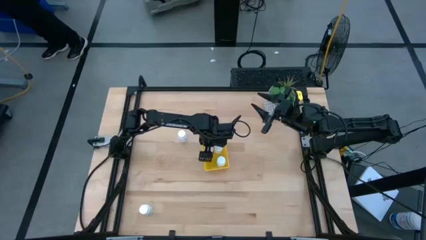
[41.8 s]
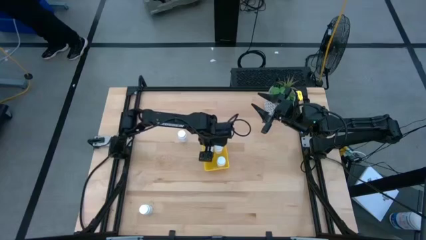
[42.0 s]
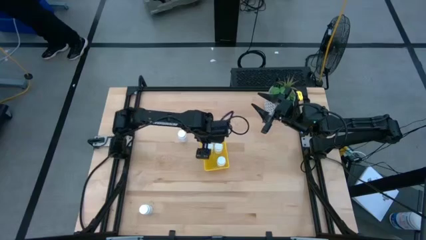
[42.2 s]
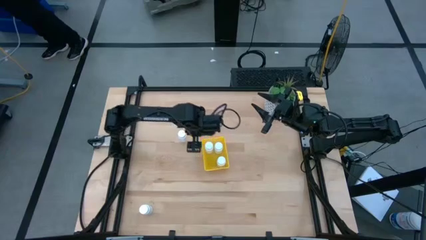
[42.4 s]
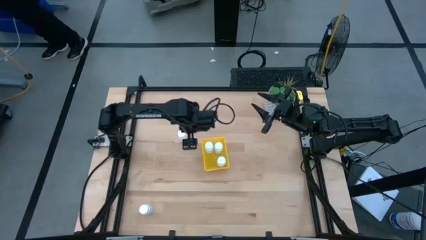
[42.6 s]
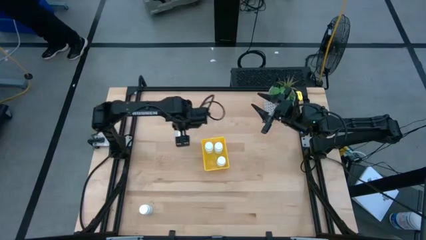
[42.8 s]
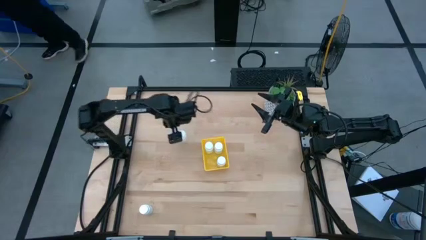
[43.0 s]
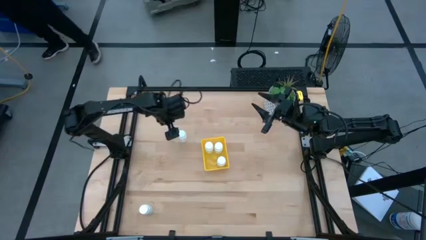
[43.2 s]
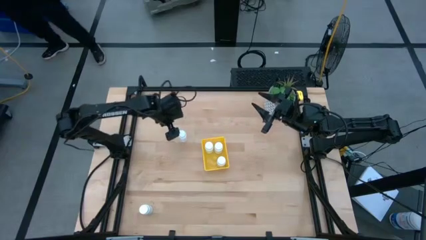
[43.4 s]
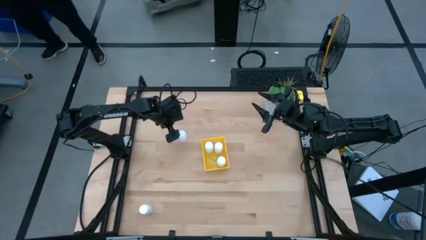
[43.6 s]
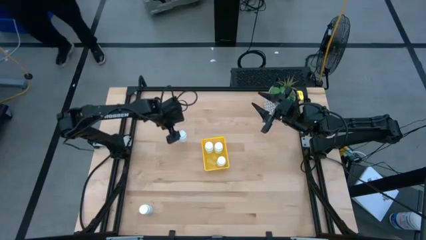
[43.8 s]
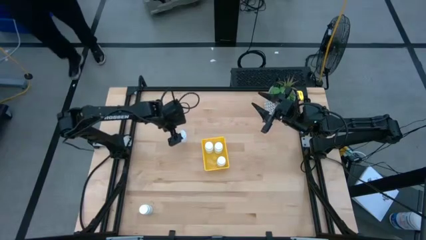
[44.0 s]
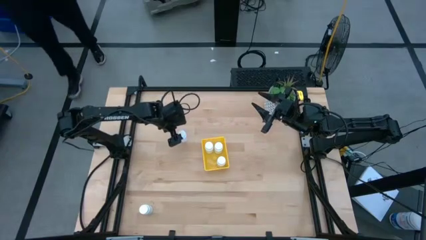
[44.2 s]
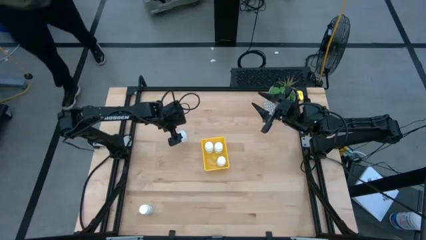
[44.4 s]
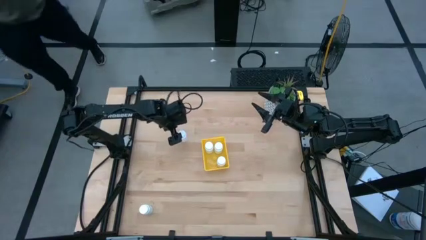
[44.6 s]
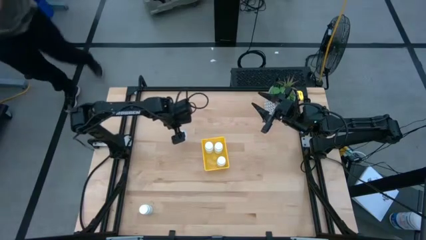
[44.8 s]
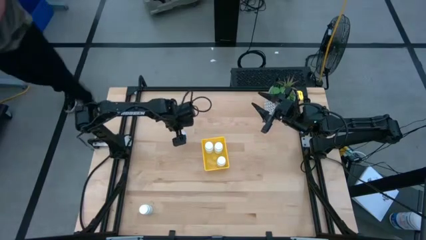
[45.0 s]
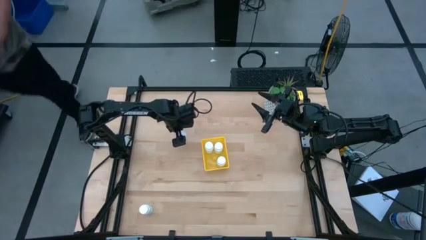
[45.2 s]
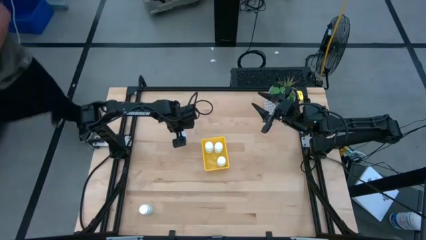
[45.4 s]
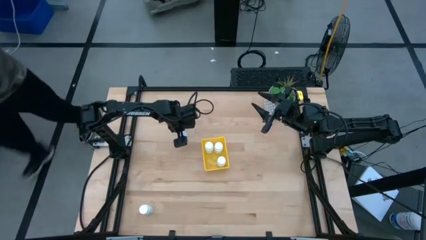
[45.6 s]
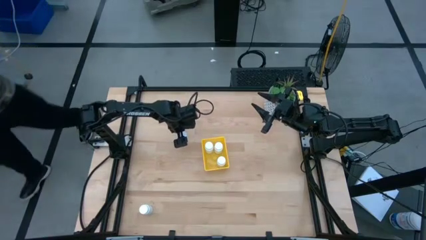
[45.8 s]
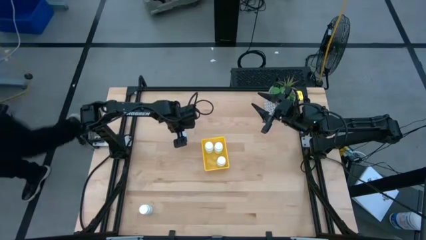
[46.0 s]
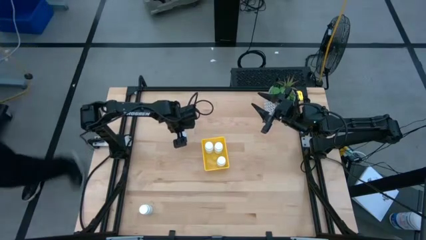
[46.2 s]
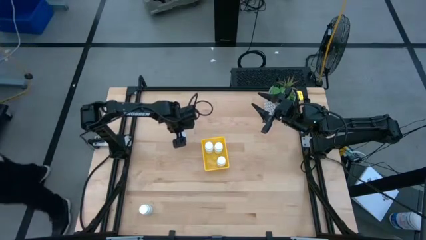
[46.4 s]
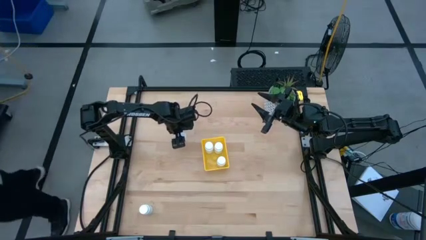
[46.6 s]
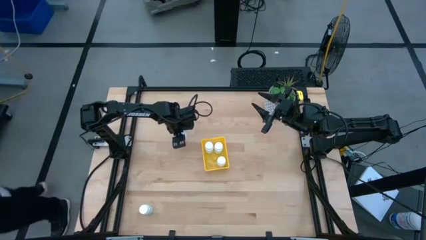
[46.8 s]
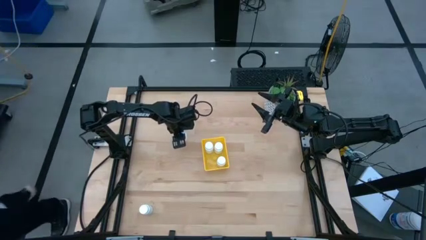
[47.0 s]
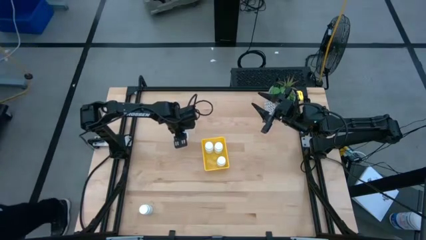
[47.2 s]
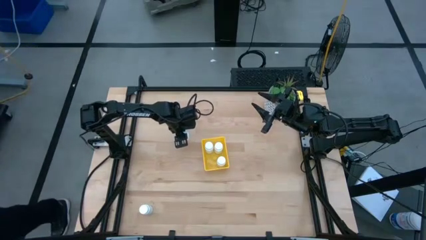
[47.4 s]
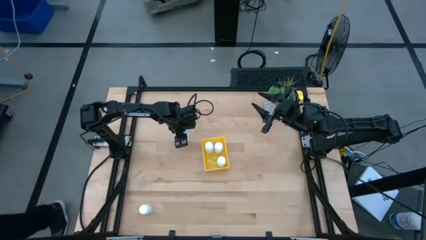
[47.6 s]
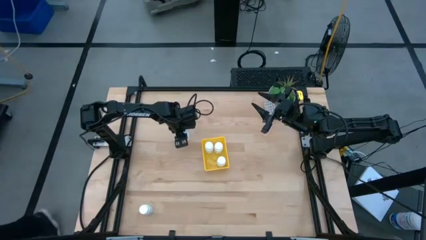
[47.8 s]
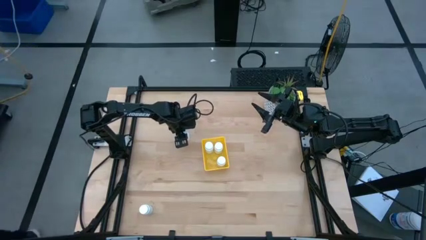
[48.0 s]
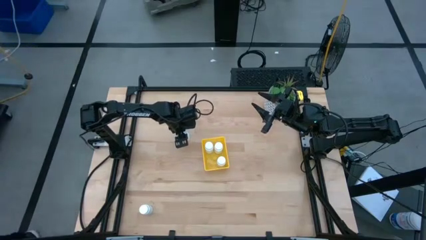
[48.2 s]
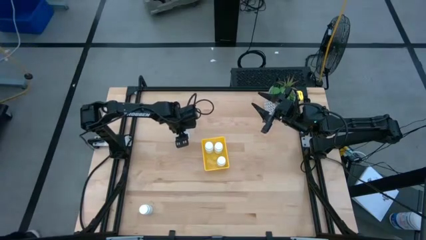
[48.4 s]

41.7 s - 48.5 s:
Task: Pick and place pill bottles into a basket
Put the white pill bottle into the yellow bin

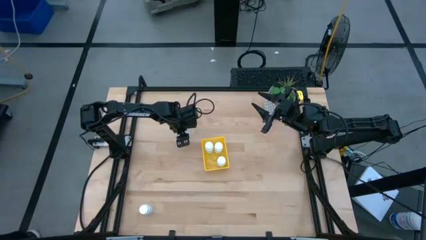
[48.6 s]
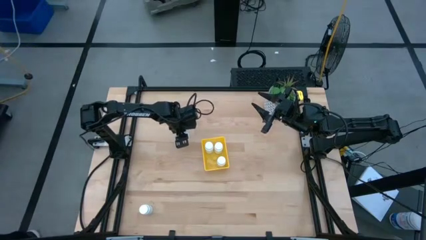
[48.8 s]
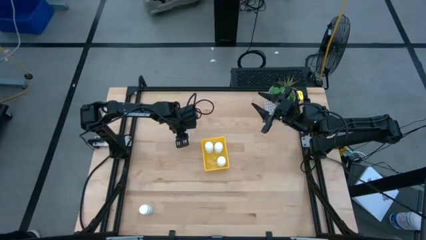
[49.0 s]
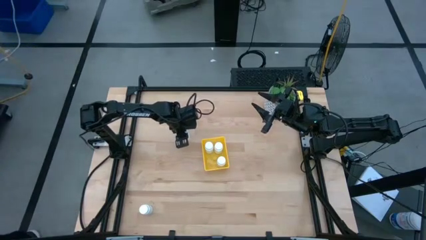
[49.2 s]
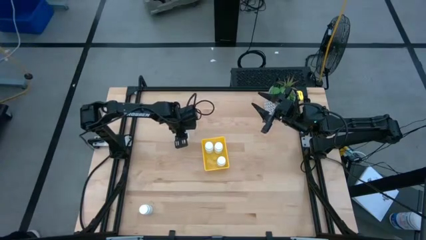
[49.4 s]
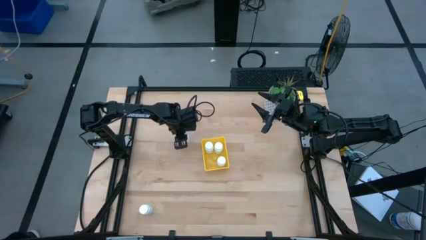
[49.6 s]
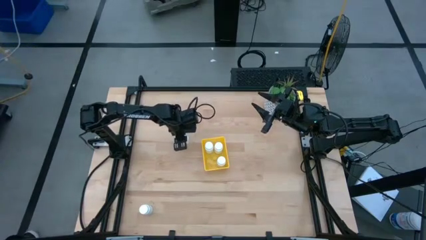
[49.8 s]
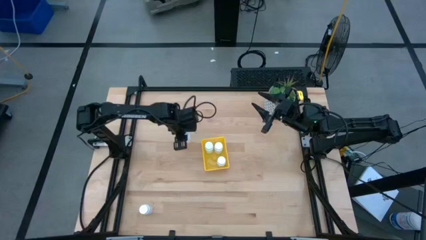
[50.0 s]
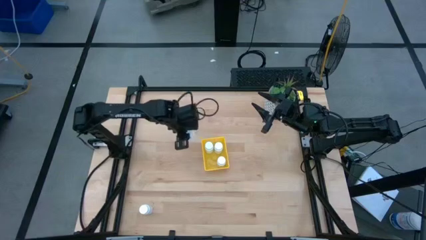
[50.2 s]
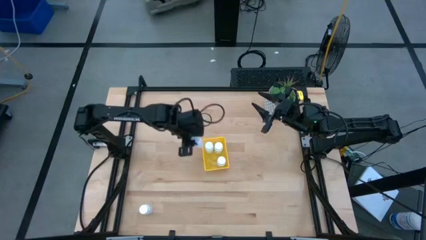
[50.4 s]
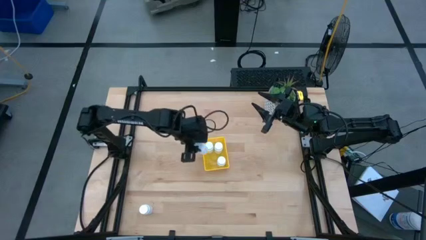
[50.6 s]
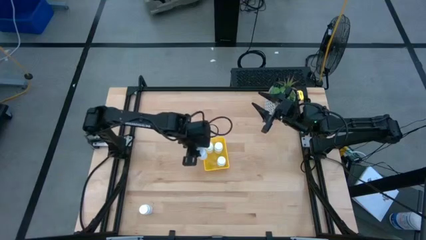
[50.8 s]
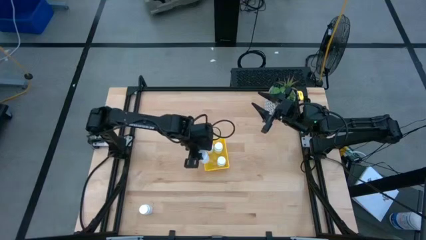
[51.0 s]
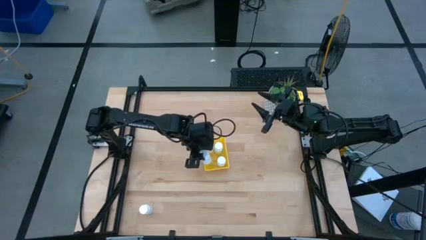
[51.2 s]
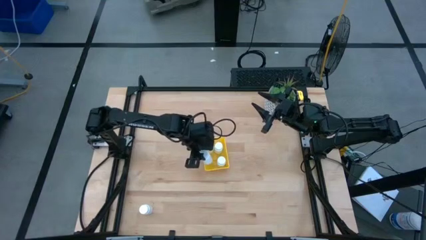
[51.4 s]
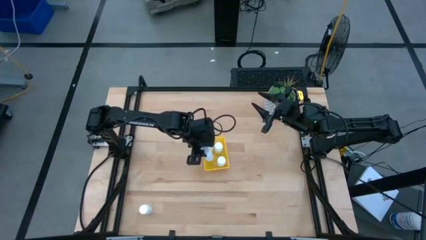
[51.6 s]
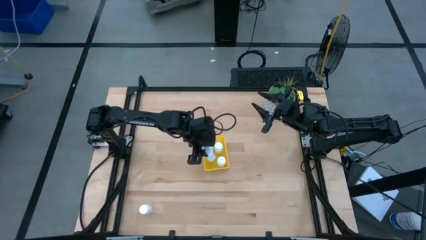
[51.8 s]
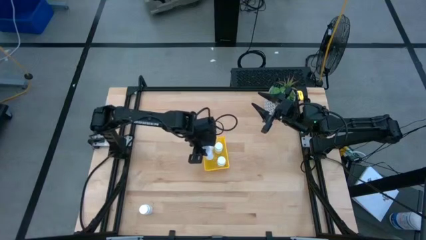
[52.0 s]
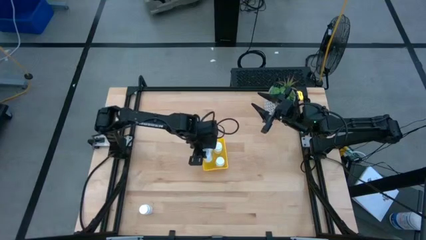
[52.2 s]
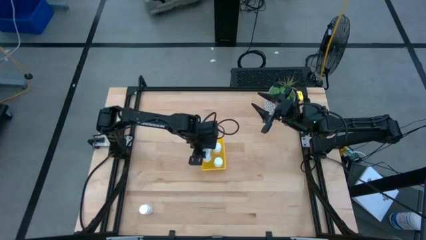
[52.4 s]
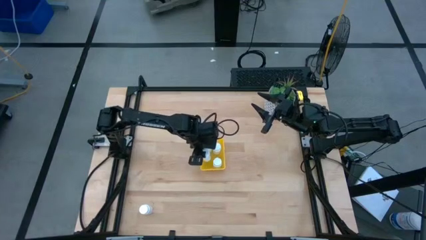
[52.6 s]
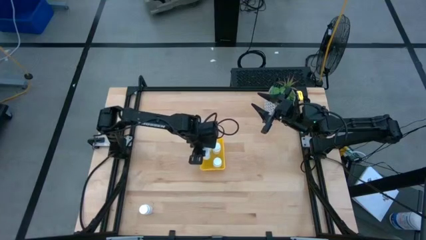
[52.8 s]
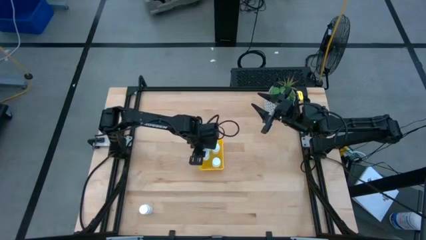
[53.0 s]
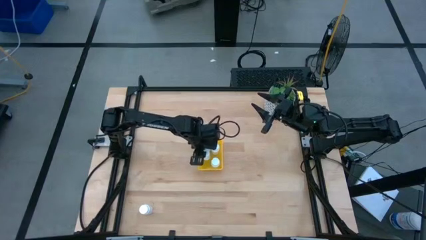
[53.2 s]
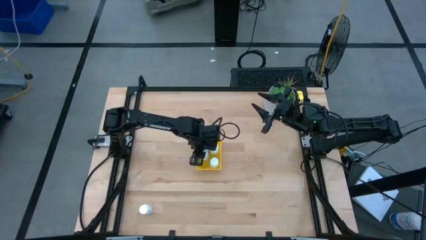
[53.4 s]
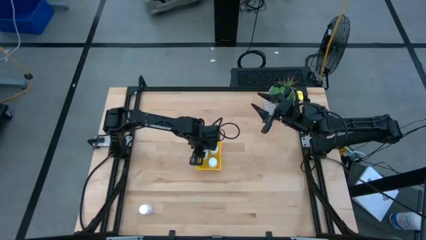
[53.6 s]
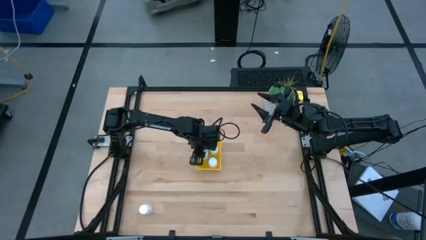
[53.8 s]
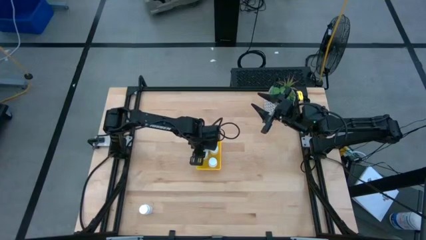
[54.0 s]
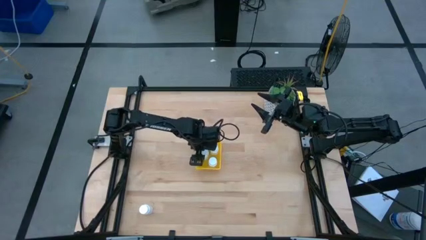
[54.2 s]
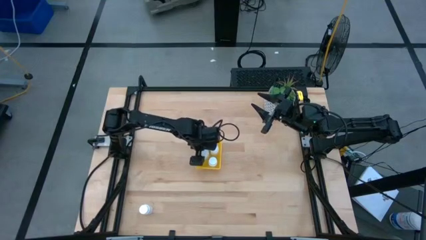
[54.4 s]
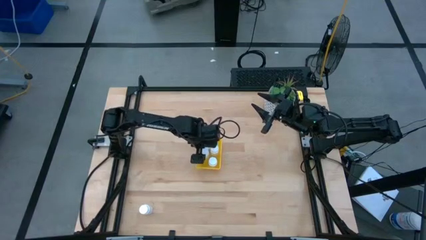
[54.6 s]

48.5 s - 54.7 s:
Put the white pill bottle into the yellow bin

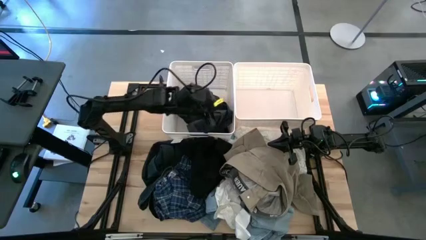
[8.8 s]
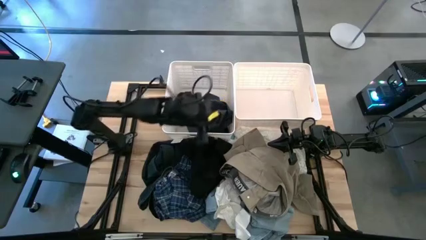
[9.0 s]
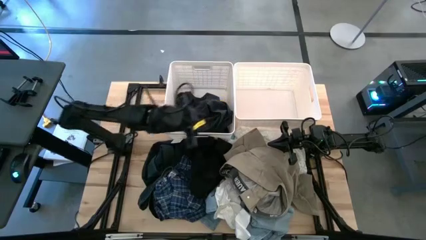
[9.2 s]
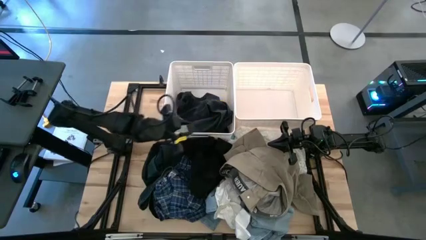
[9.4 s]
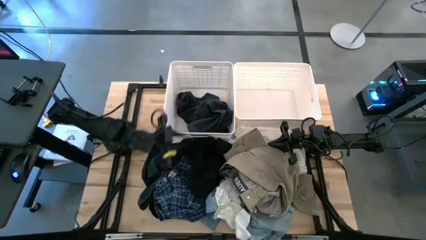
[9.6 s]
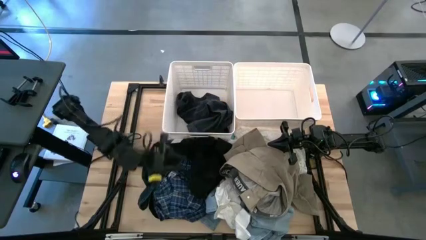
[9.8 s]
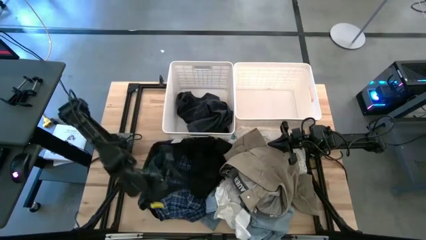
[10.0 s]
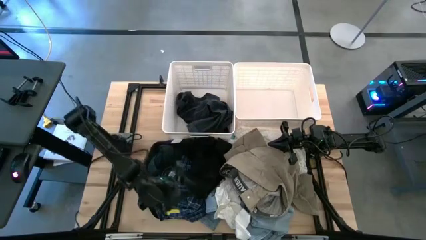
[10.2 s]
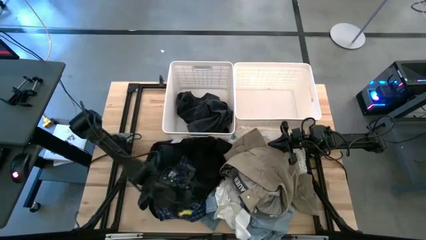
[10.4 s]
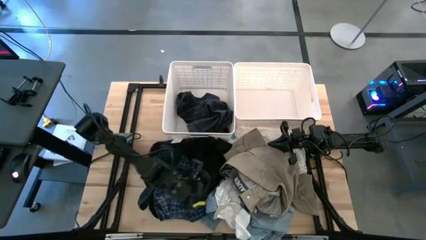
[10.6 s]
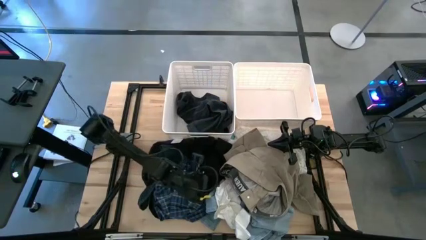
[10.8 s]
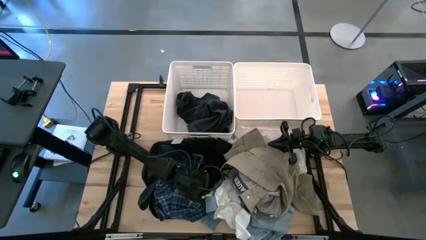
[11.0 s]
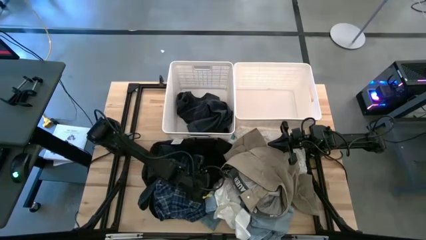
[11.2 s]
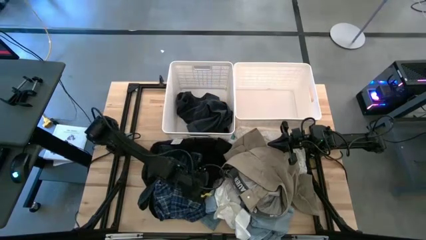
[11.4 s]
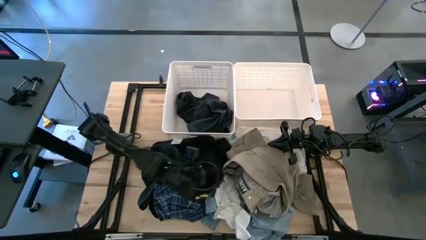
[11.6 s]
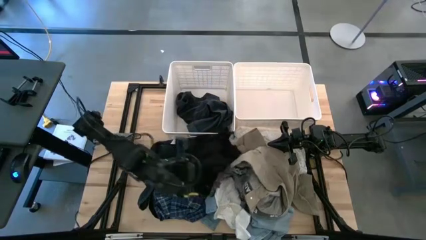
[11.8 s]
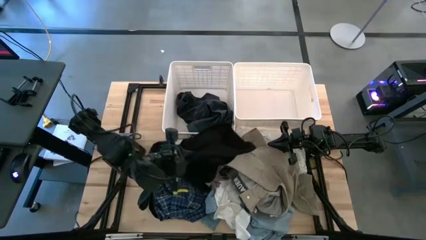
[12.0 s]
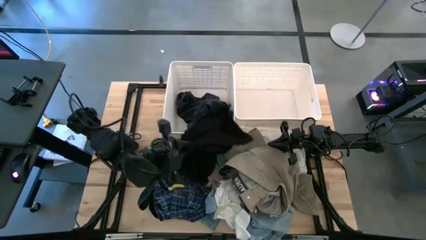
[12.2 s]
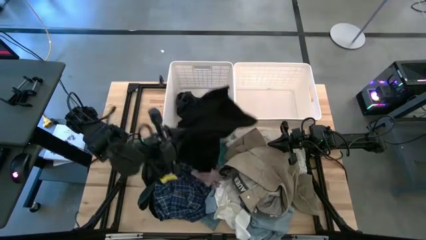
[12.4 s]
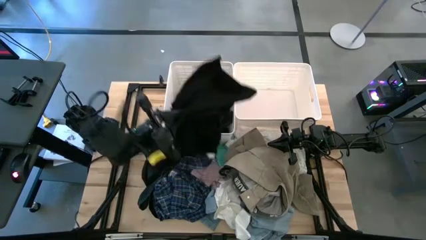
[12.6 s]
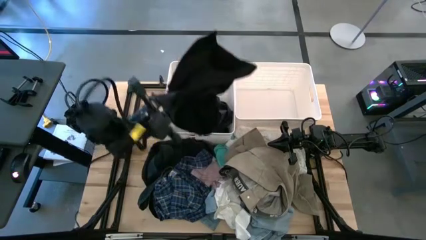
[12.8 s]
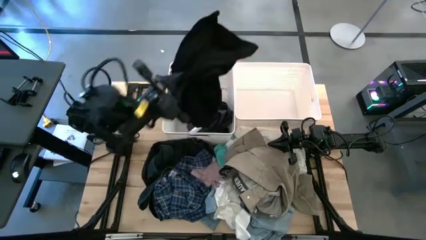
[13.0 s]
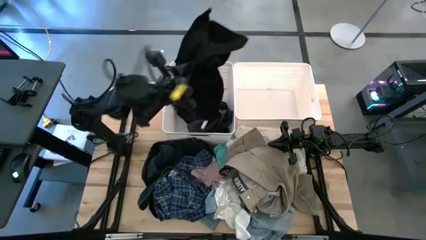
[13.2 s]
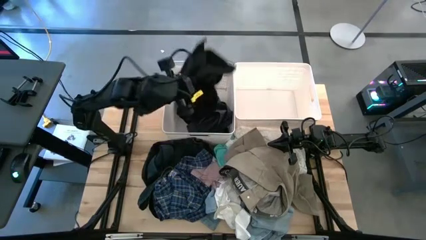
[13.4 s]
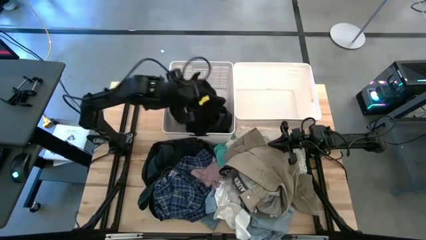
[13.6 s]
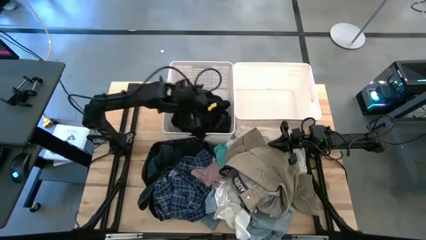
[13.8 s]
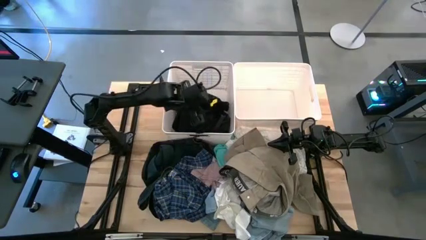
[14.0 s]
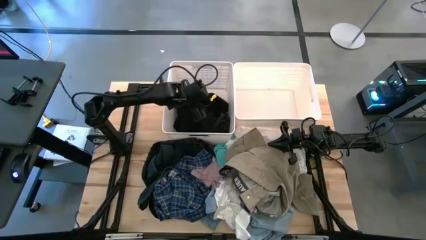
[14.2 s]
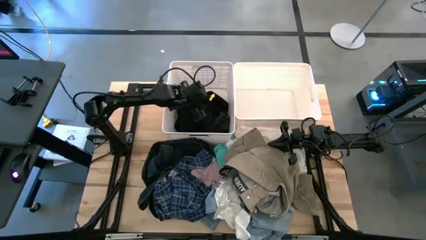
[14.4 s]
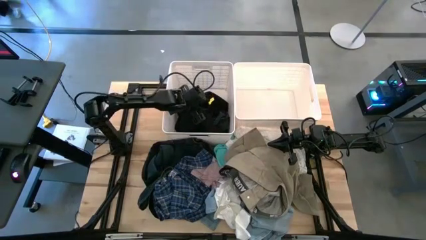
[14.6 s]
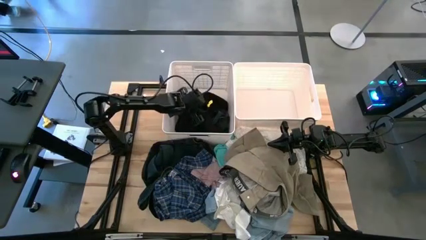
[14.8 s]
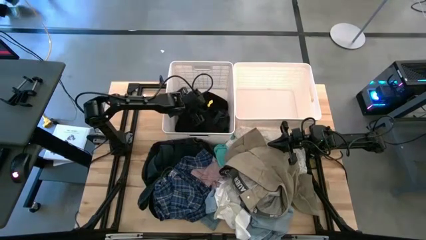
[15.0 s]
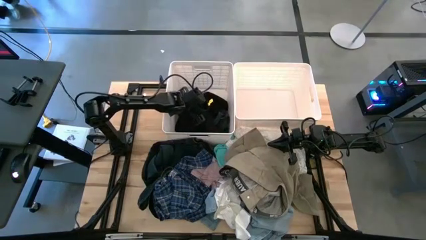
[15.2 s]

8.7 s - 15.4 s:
Task: Sort clothes
Put the black shirts into the left white bin
